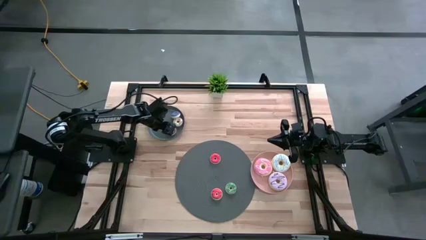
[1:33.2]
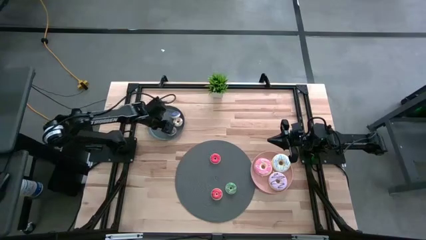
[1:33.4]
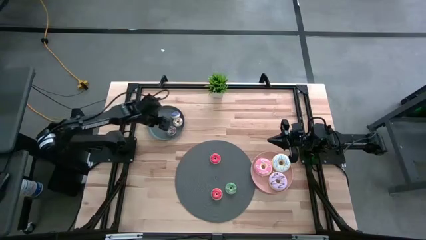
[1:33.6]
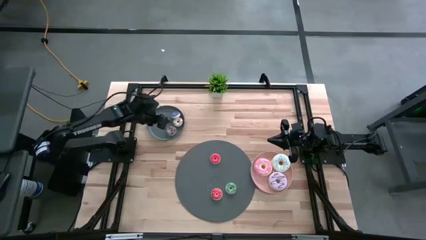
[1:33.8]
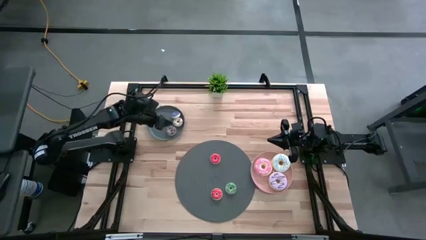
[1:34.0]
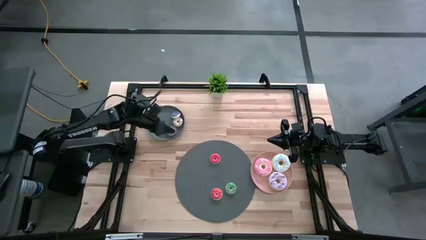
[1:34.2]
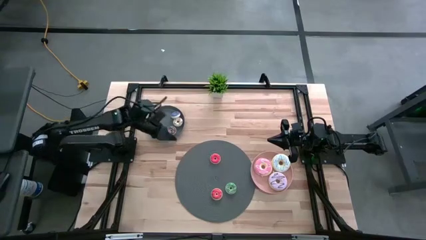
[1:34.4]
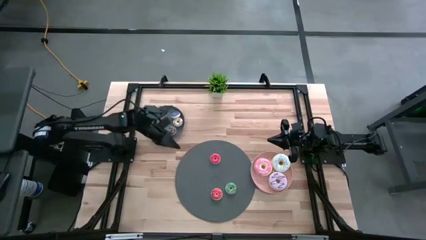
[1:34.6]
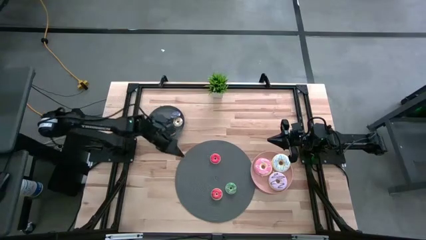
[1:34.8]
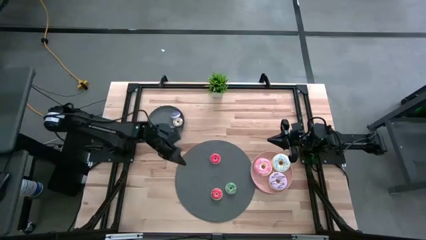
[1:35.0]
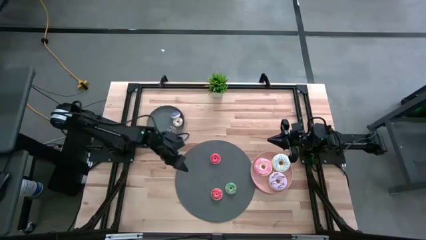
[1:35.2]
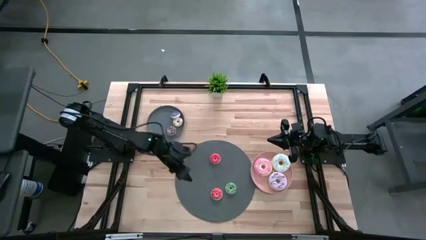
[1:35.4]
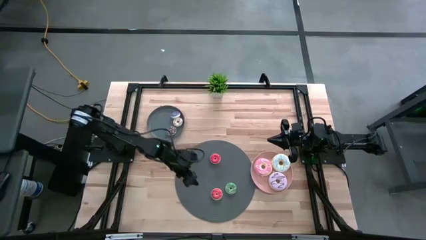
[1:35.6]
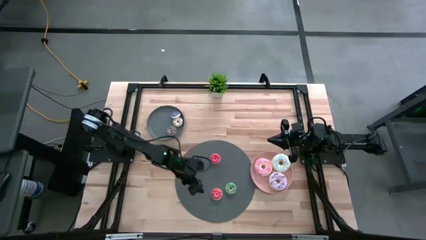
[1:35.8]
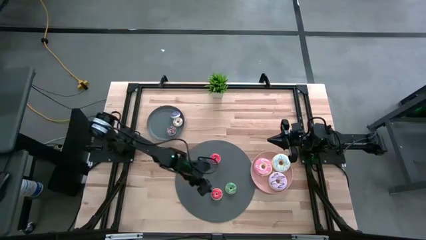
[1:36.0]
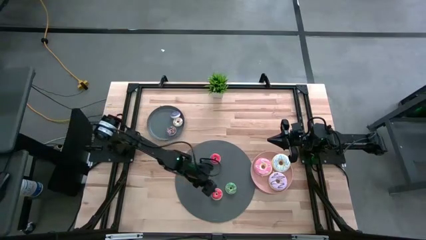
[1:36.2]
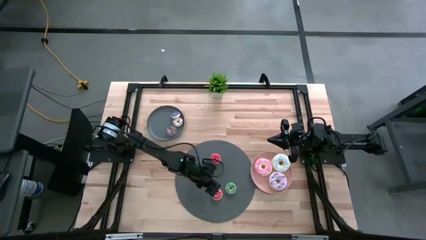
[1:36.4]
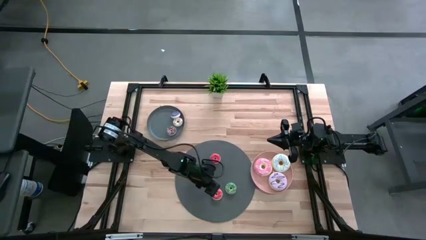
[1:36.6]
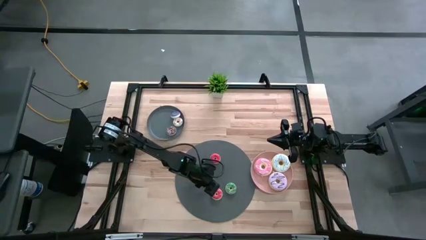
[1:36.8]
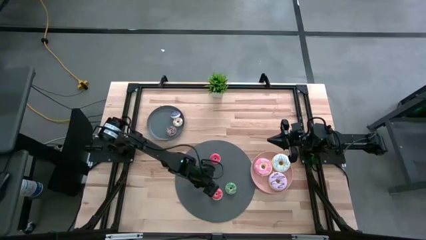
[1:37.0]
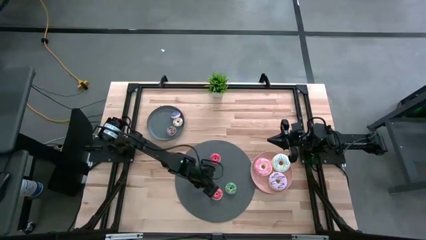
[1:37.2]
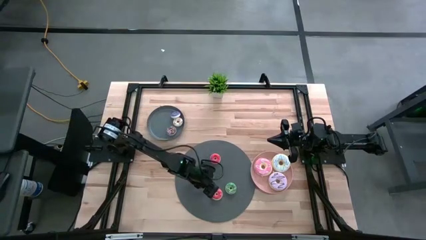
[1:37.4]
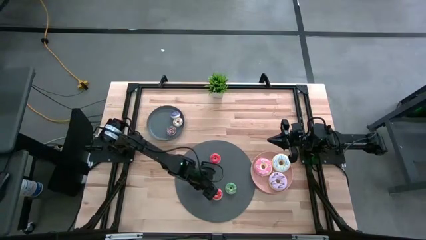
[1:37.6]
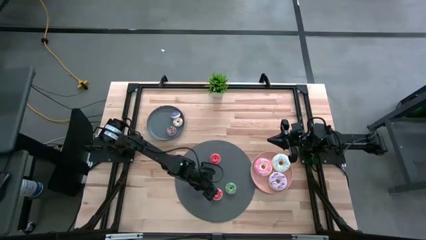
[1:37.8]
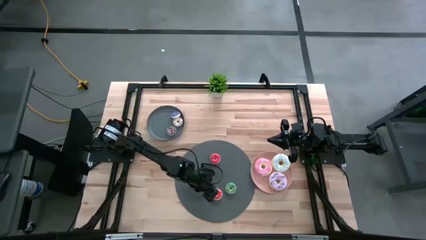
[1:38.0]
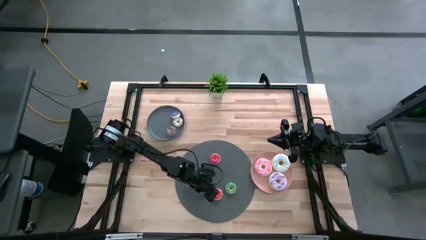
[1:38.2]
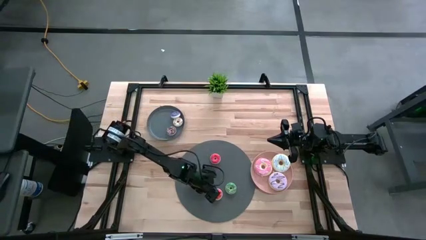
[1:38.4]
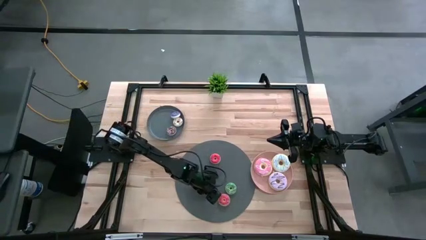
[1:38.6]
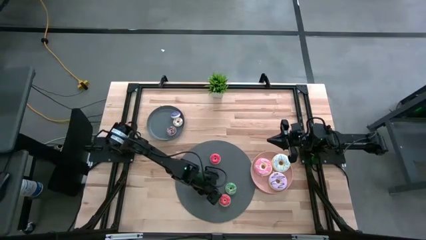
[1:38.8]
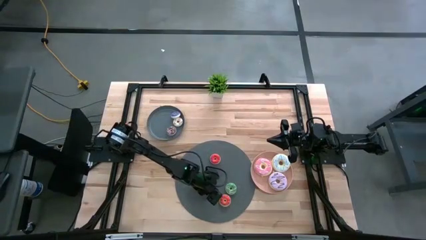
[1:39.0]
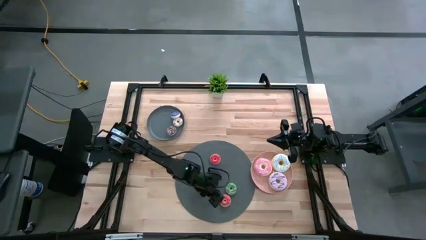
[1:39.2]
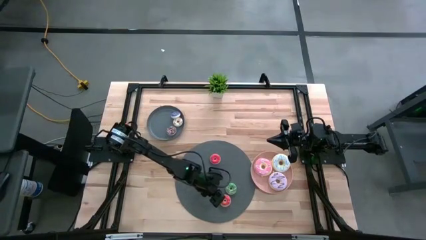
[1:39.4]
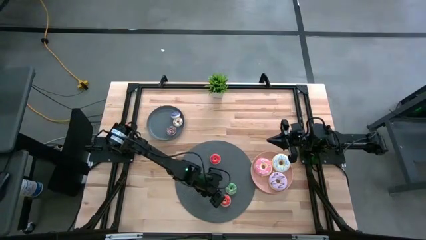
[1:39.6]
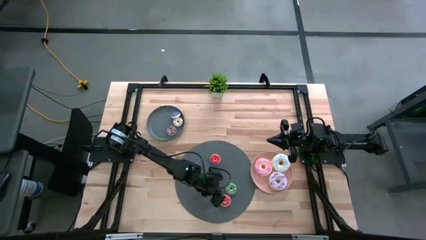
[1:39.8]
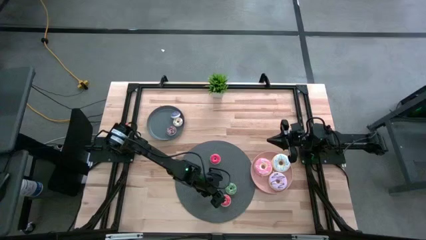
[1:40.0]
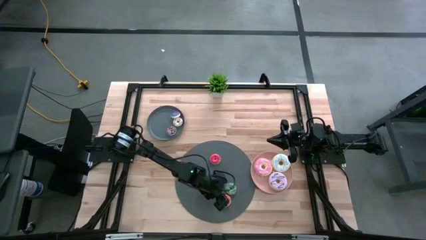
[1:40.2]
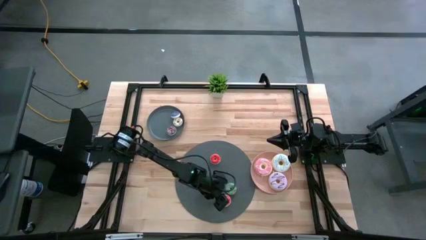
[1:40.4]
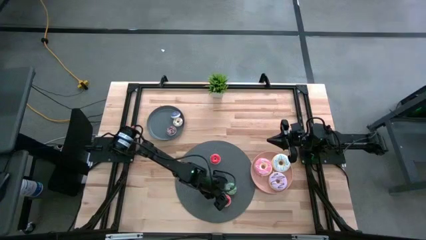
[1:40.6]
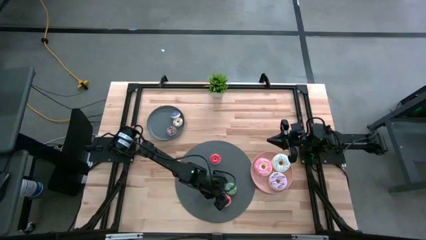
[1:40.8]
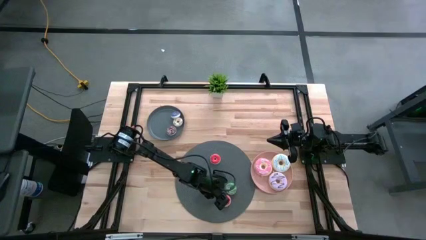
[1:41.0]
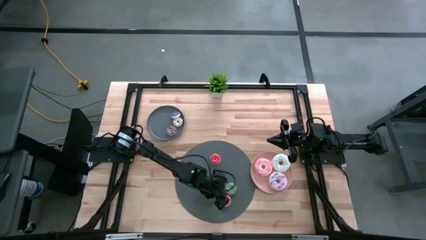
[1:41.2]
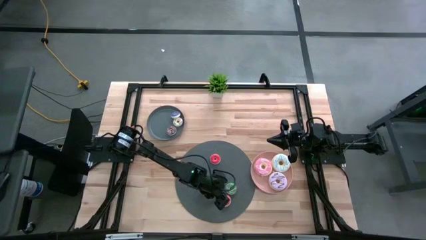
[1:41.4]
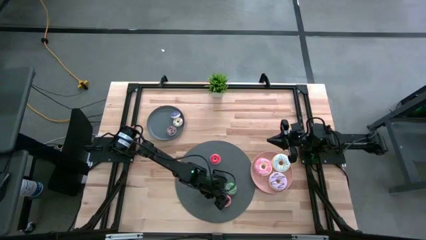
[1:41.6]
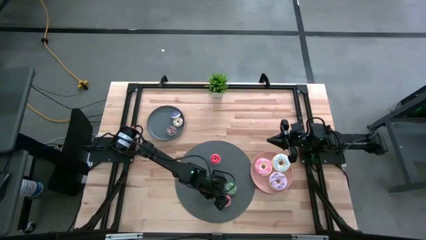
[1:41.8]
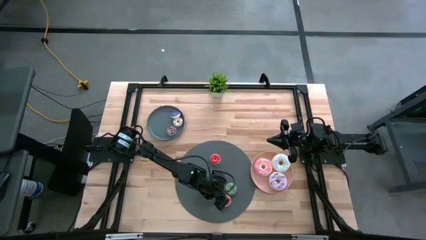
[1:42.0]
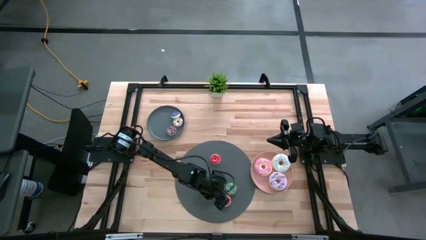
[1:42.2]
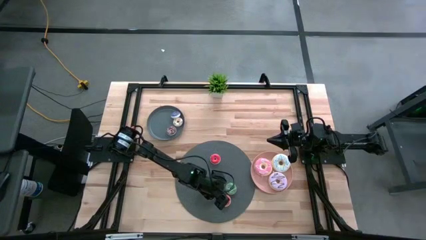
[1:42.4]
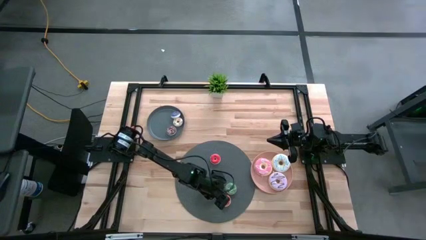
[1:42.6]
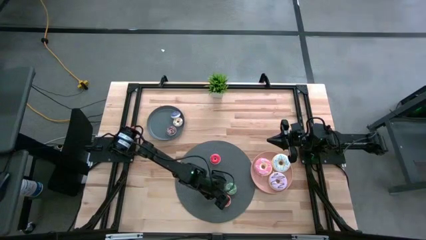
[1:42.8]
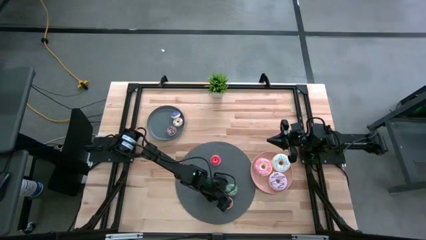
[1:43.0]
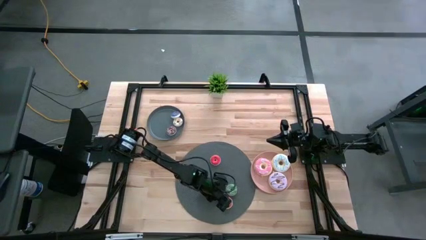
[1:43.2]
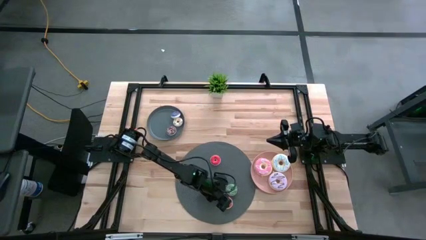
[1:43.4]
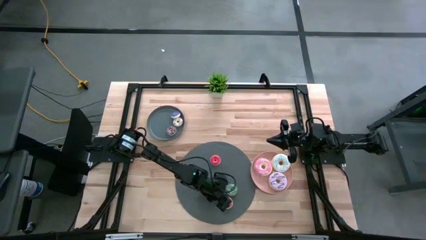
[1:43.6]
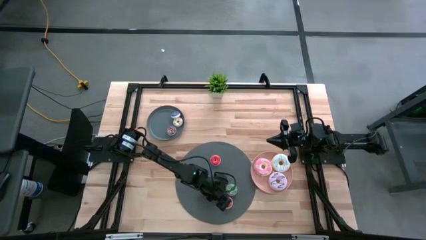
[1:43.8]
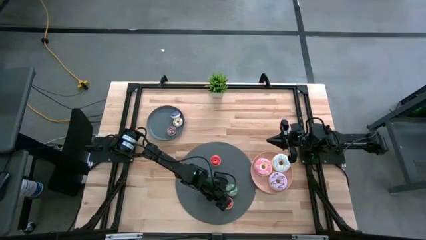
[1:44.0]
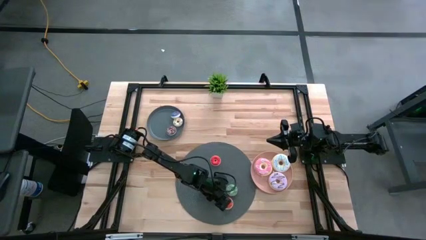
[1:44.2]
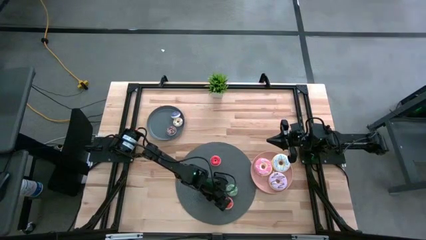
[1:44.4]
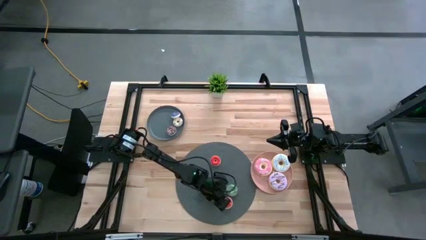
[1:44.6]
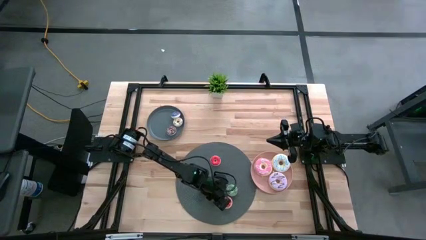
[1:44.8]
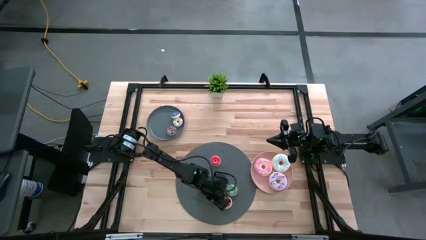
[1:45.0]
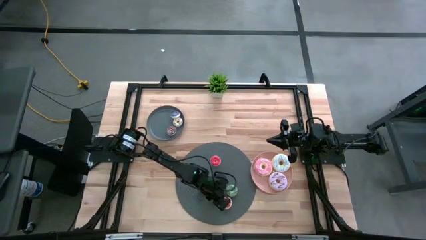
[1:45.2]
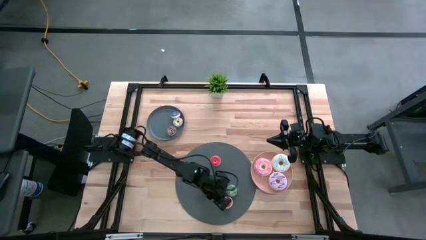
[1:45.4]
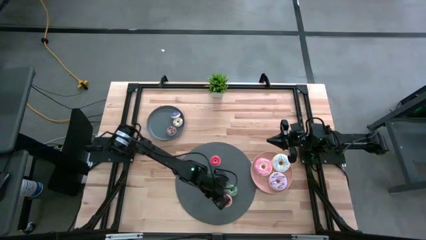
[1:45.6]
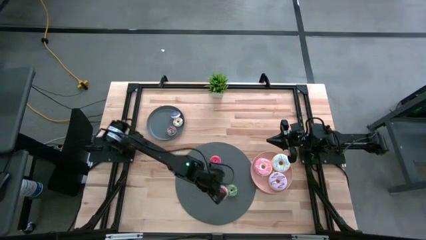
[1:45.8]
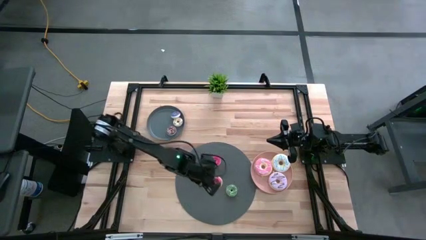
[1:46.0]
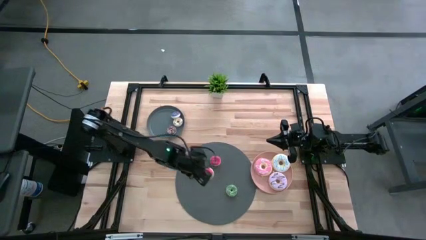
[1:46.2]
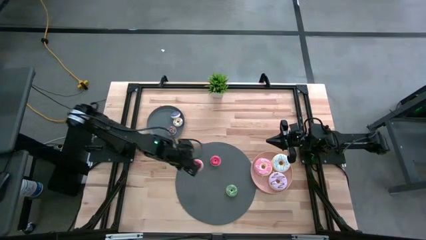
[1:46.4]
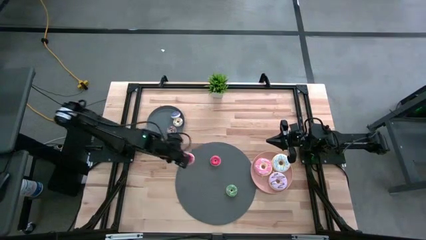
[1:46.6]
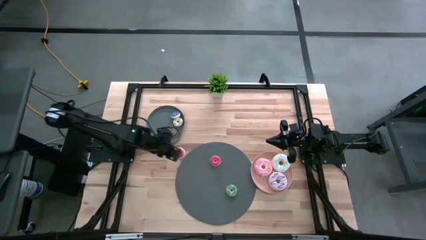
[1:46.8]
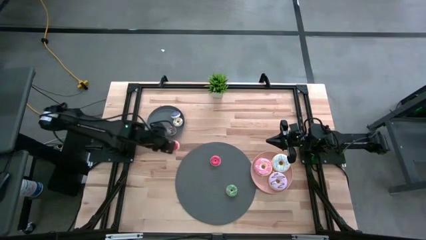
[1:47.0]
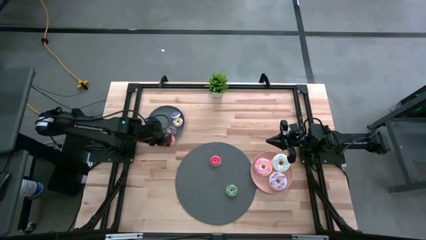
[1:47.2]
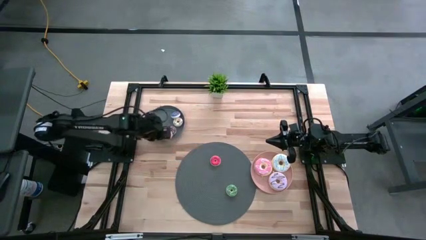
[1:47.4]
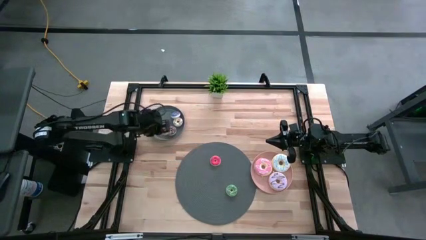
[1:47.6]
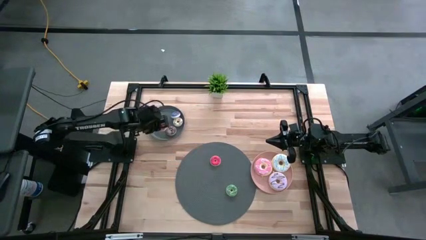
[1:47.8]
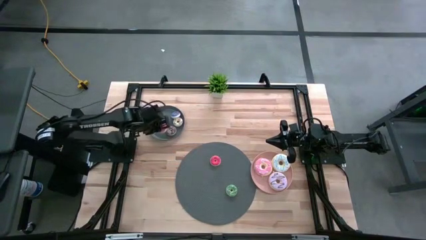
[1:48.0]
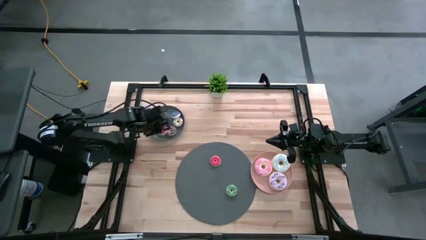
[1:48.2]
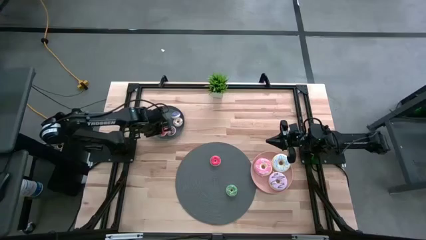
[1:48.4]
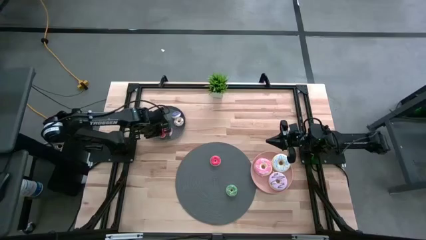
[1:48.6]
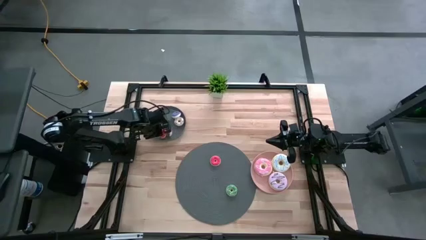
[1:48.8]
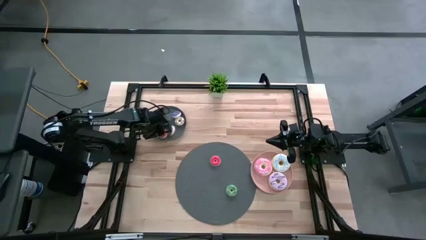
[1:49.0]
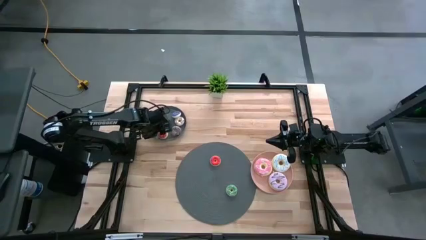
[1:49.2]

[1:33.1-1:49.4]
Task: Pick & Place donuts
Put the small red donut on the gray plate

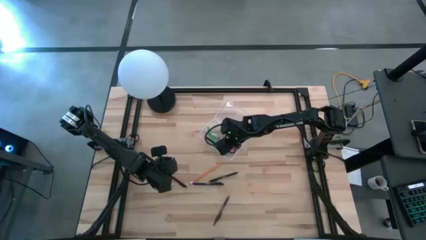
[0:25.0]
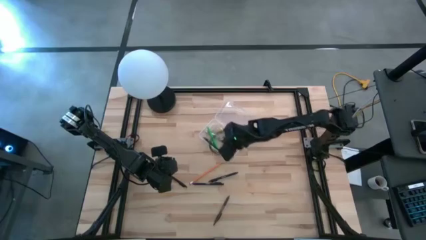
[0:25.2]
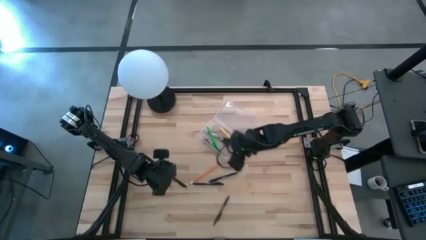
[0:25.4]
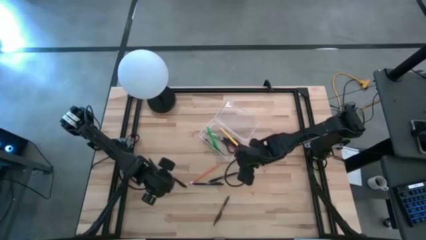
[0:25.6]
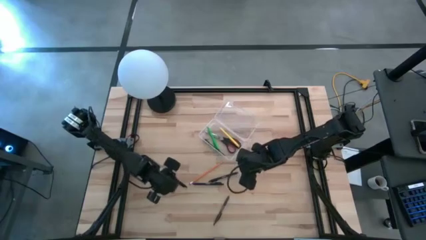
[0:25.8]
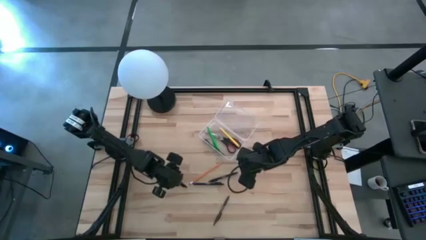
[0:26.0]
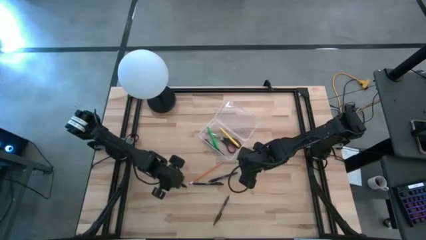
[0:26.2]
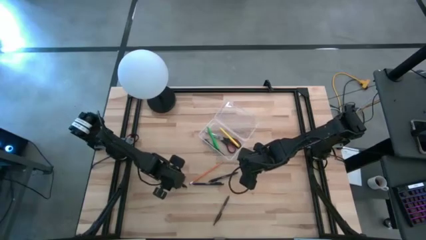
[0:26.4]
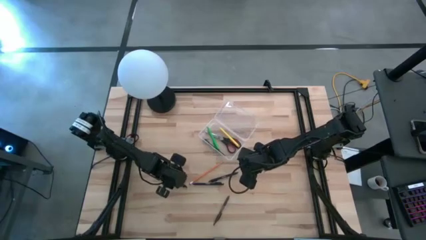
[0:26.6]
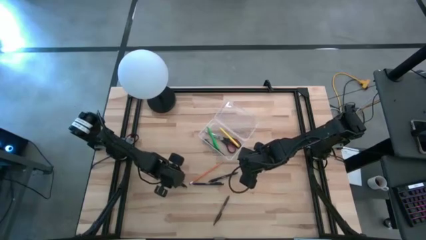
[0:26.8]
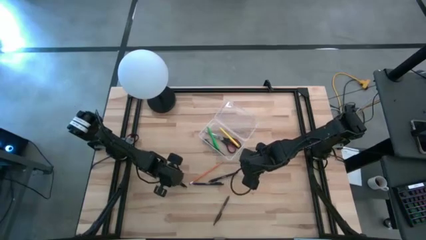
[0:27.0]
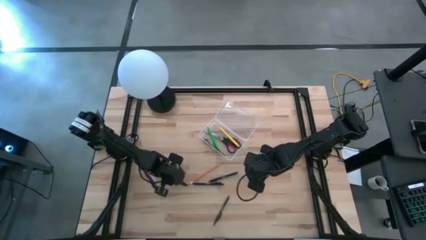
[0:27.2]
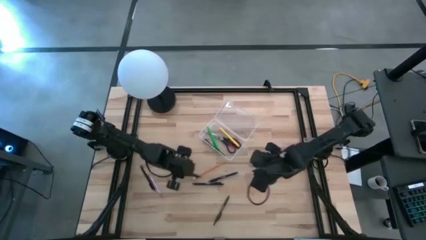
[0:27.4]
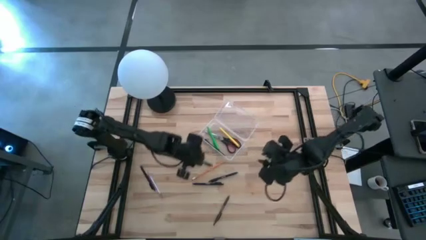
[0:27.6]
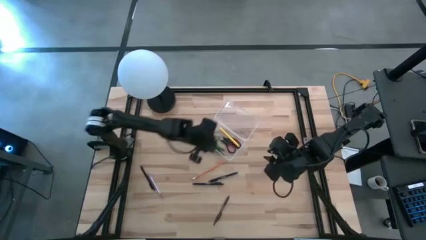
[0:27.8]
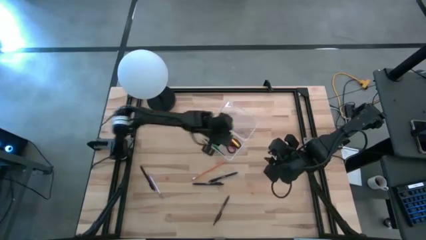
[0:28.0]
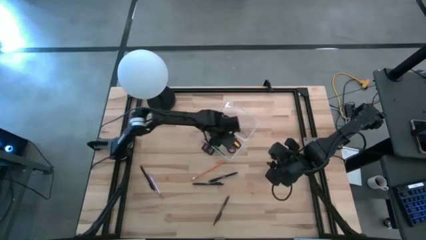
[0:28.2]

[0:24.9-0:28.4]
Task: Pick & place school supplies into a supply box
Put the black pen into the transparent supply box
